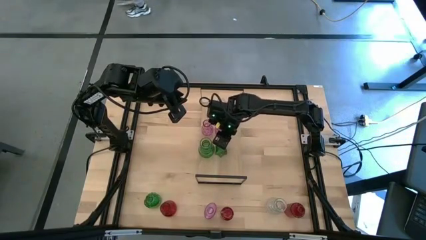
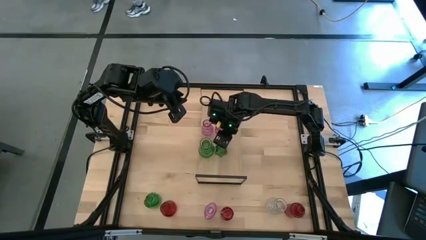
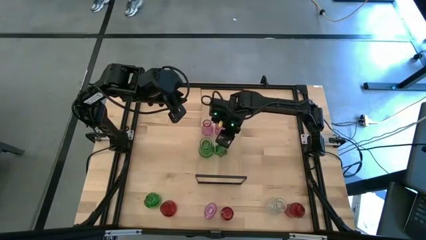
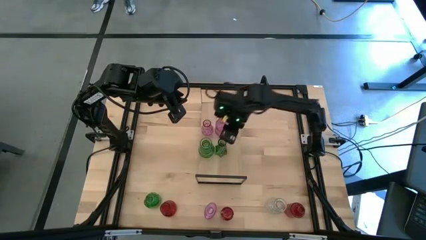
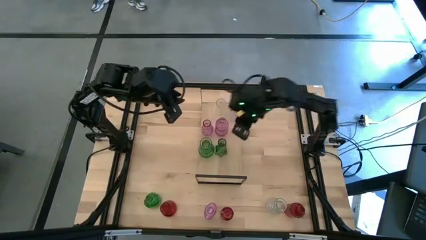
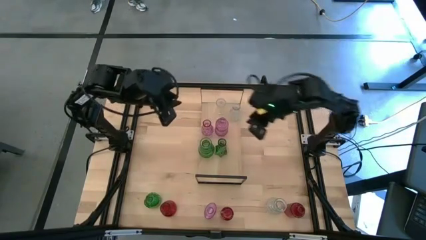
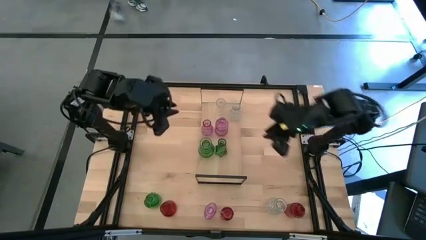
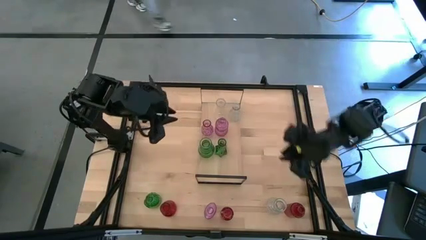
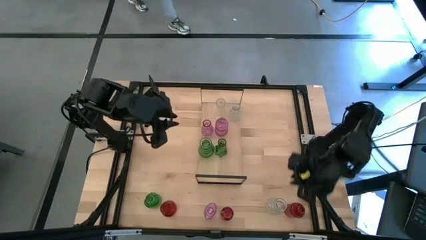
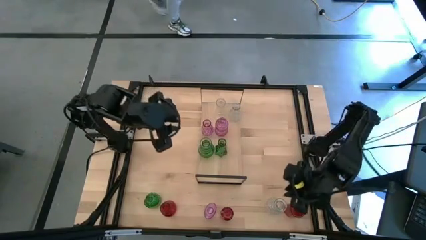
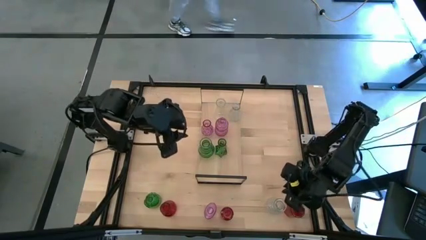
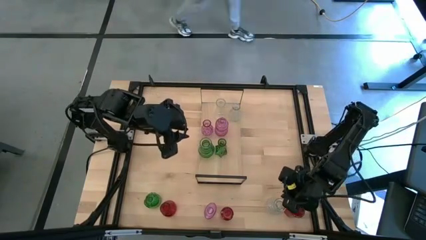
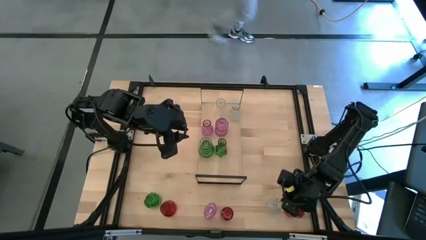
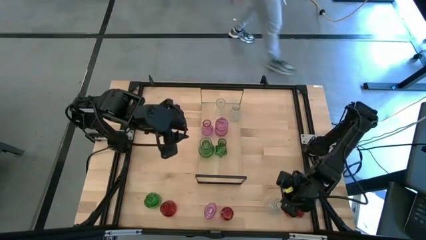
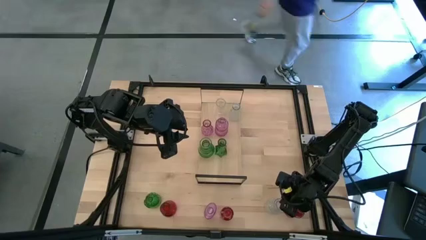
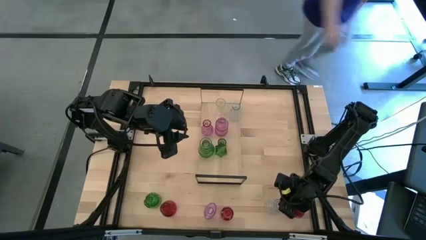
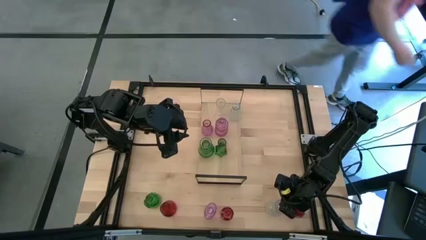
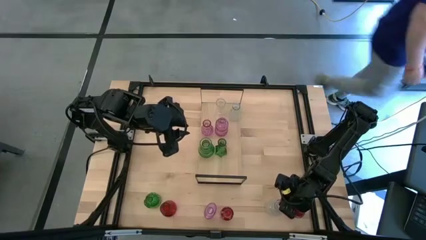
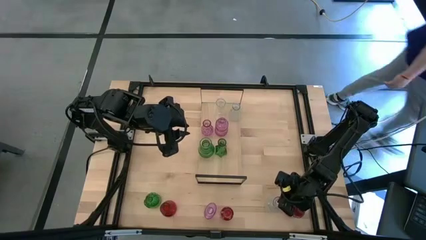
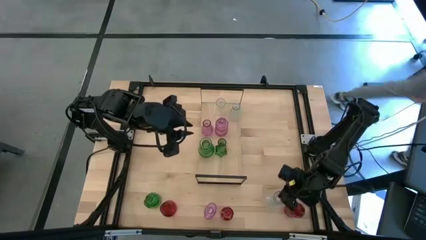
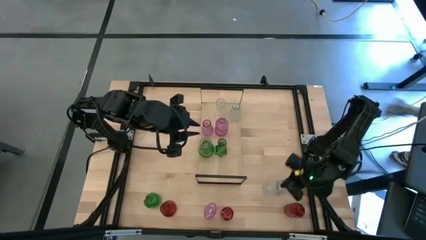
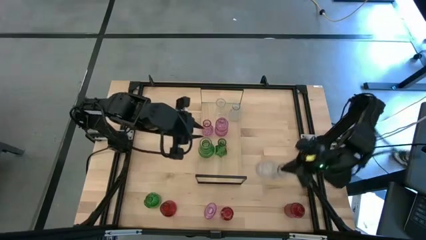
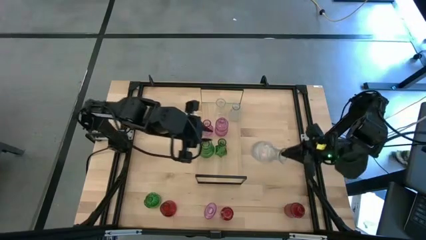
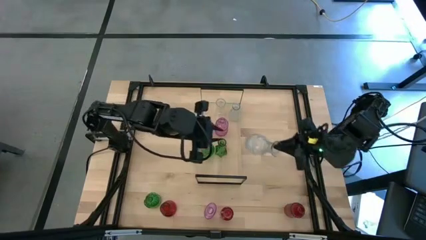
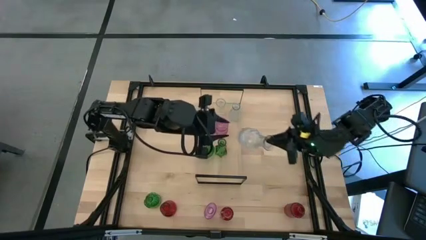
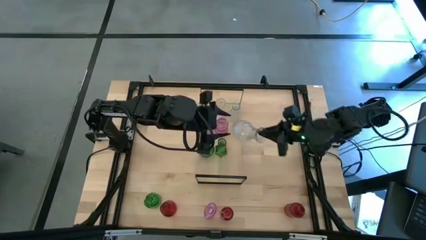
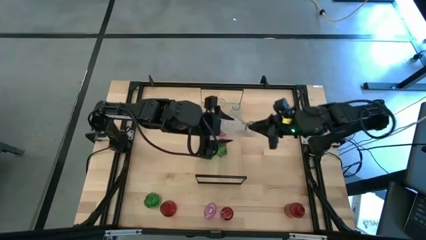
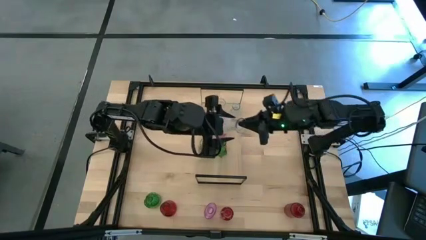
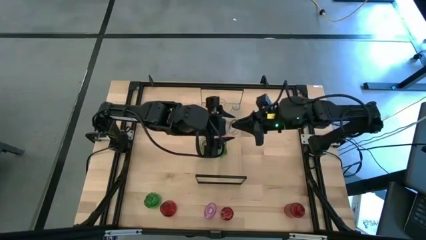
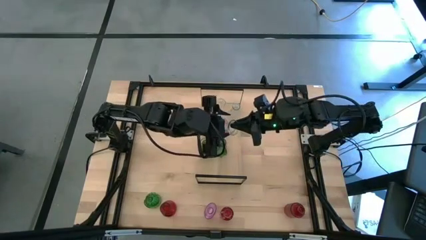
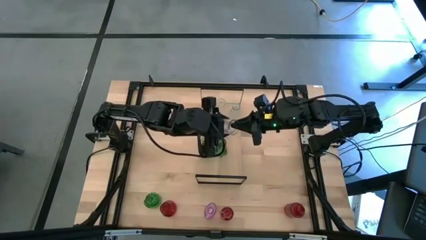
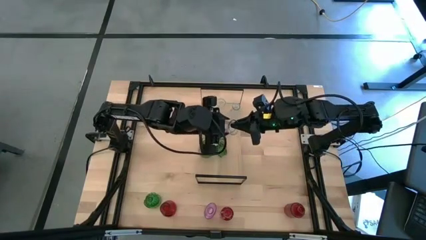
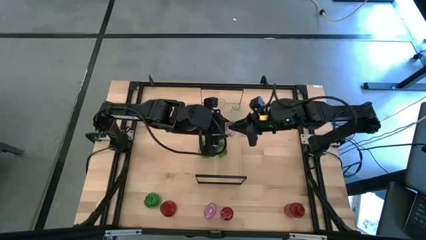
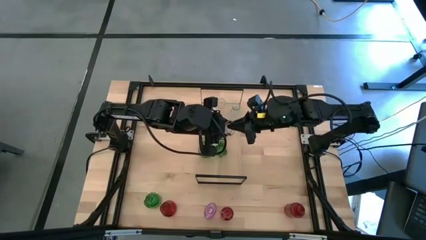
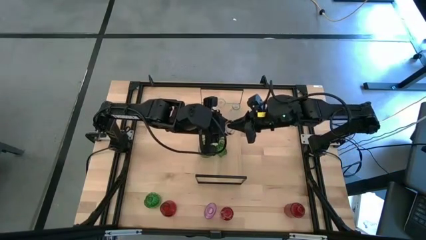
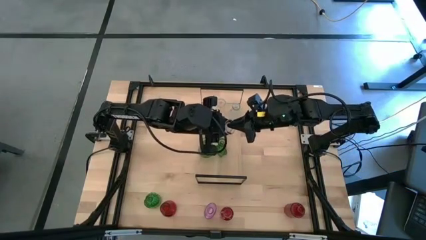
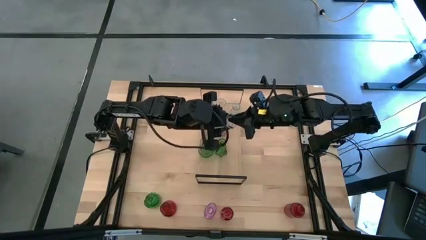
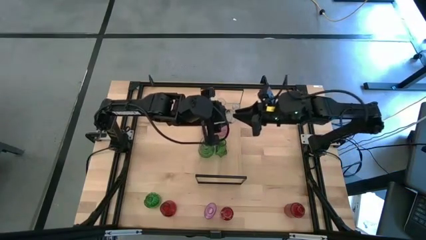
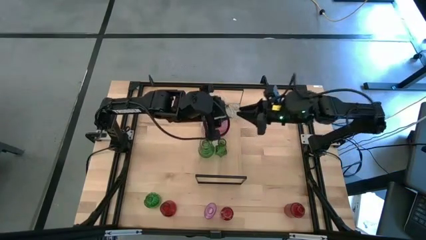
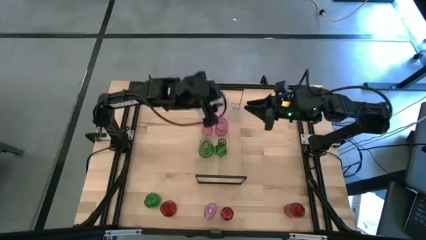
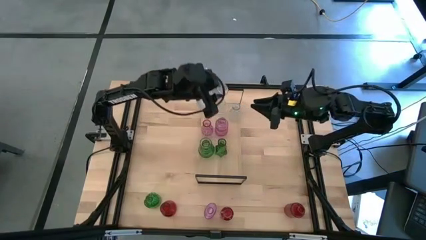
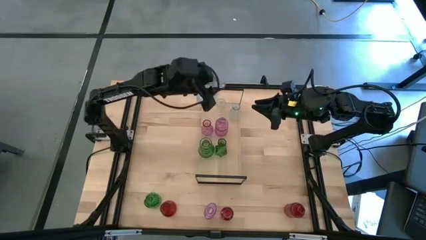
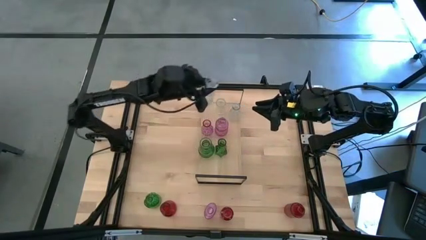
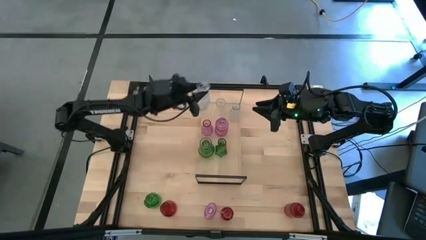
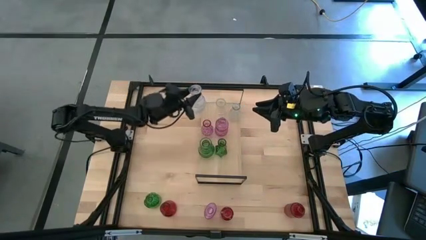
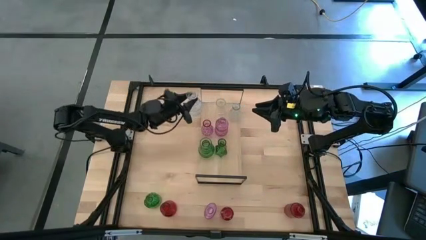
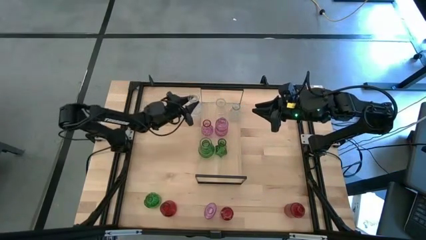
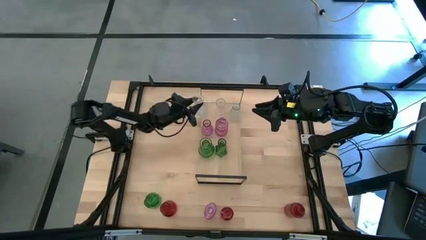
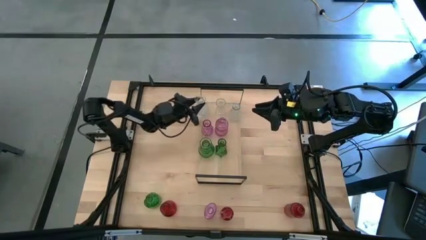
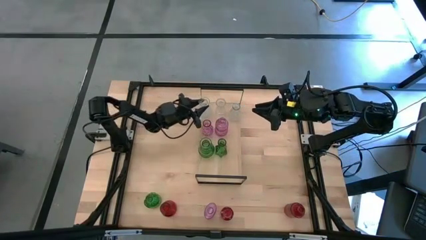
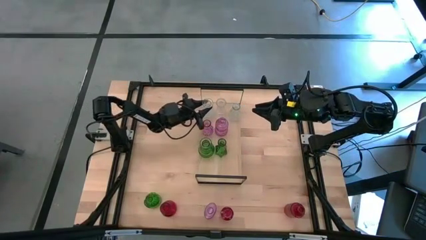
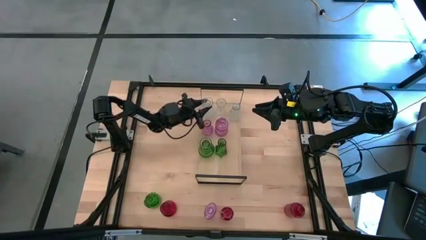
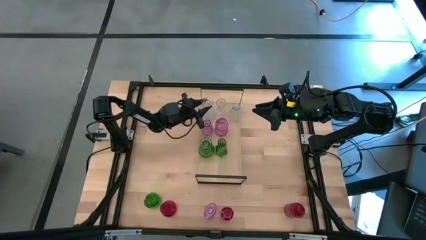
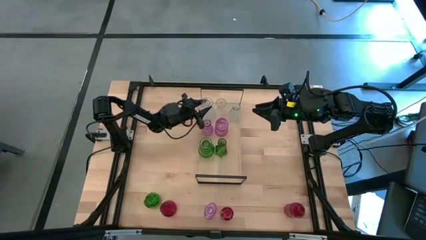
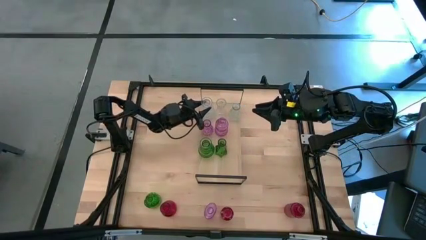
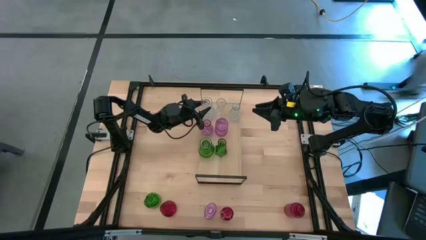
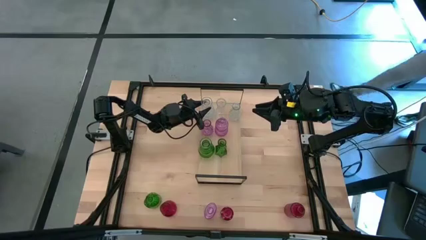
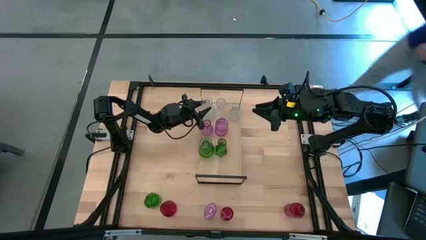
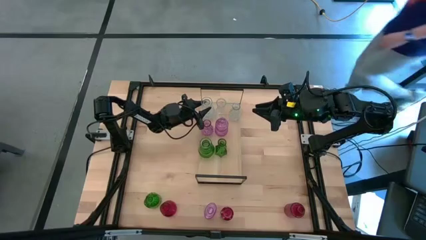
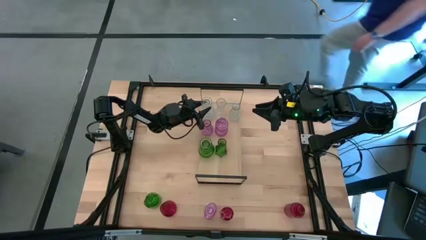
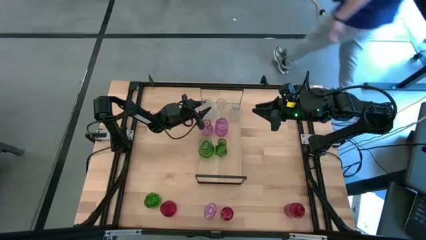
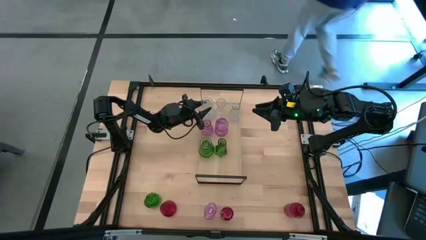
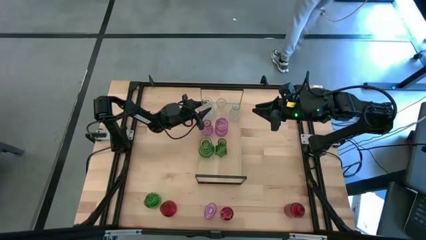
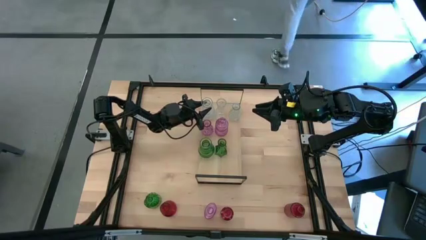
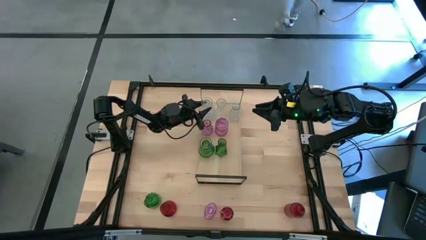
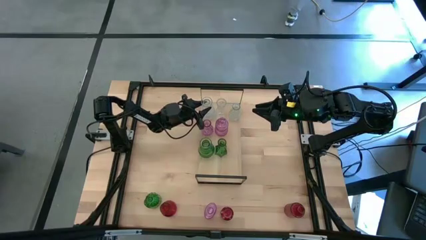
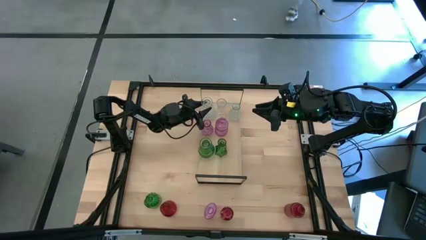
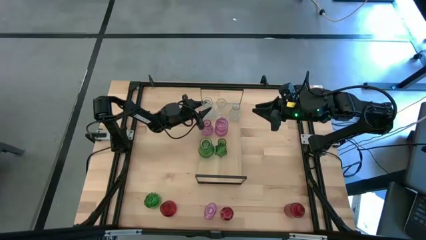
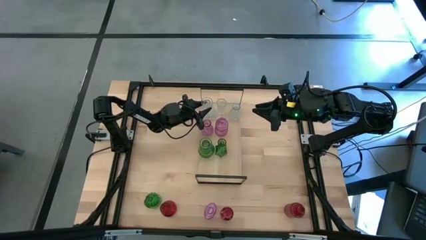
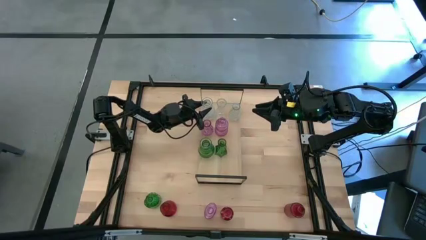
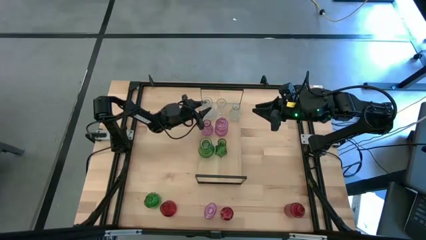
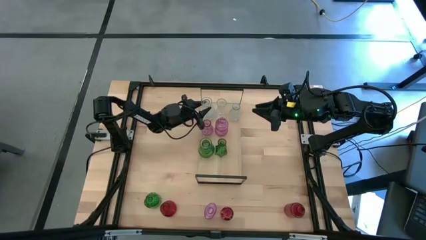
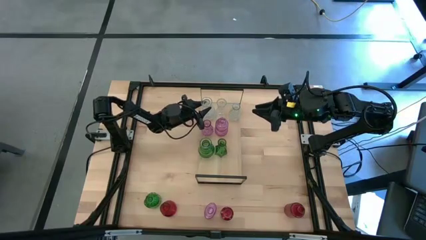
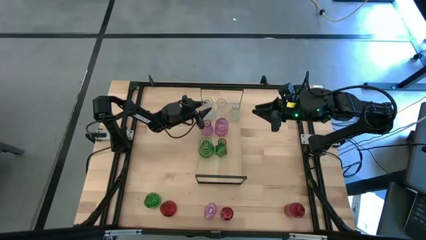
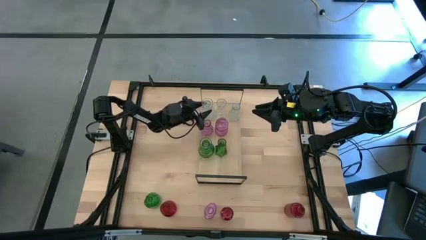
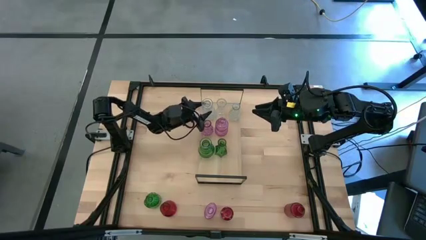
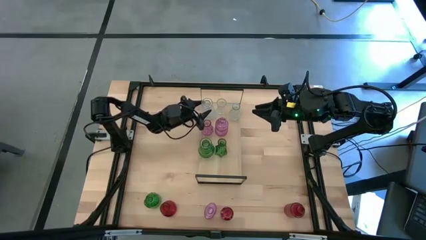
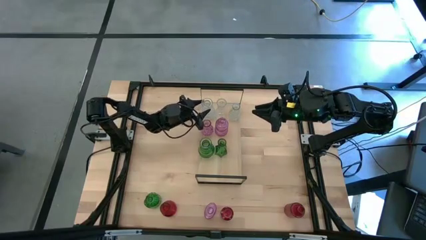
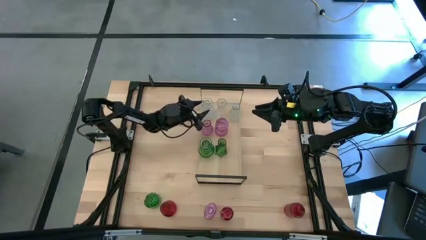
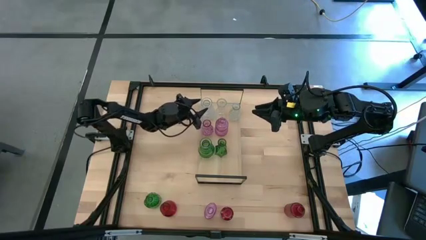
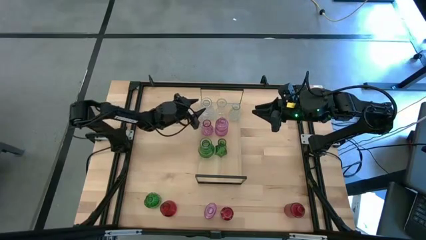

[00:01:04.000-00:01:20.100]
Task: sort vases onto shelf
Put the transparent vase on the shelf aligned with the other transparent vases
